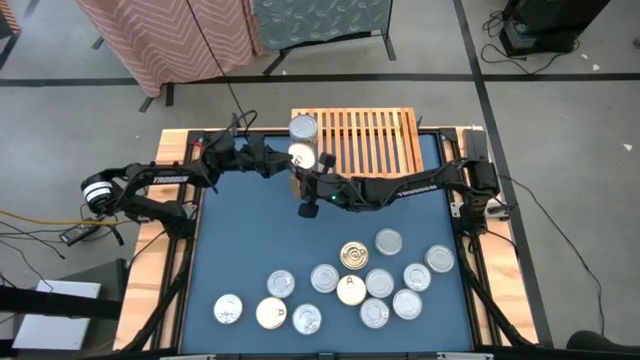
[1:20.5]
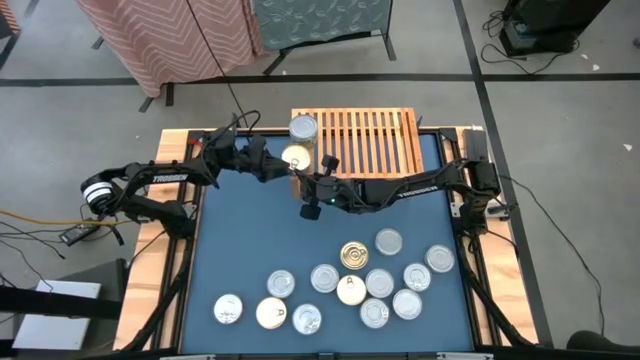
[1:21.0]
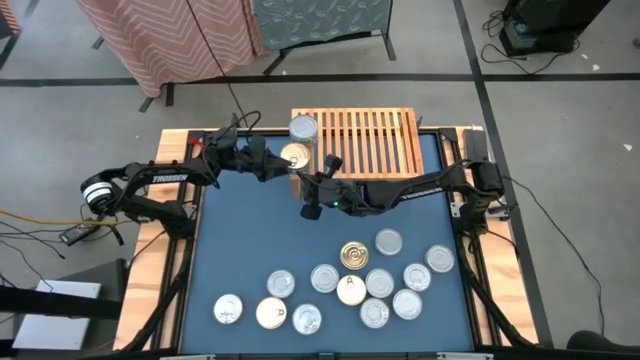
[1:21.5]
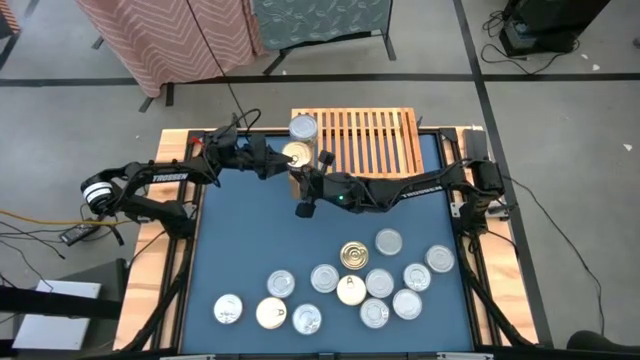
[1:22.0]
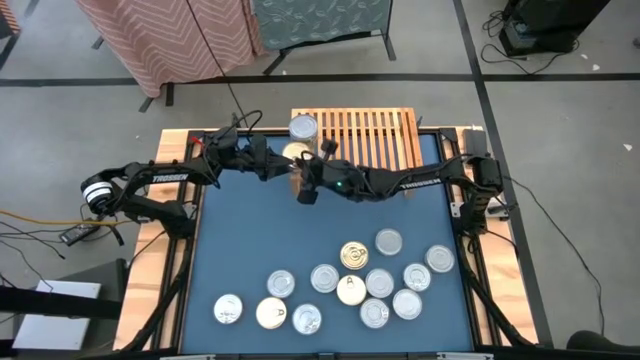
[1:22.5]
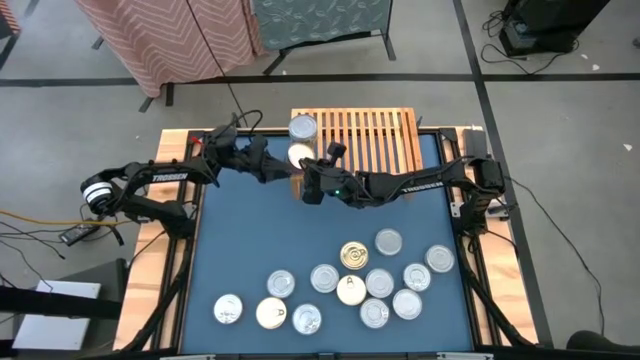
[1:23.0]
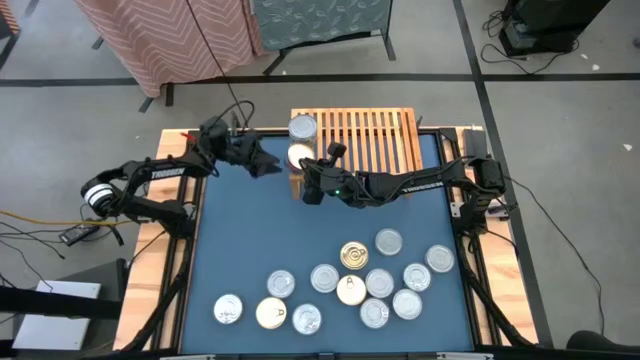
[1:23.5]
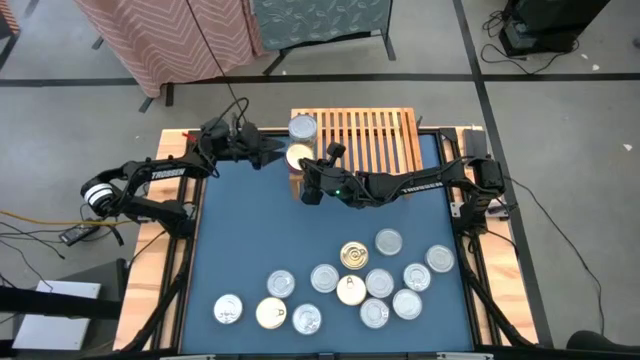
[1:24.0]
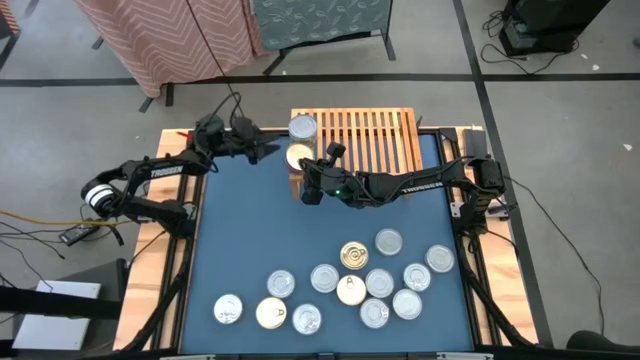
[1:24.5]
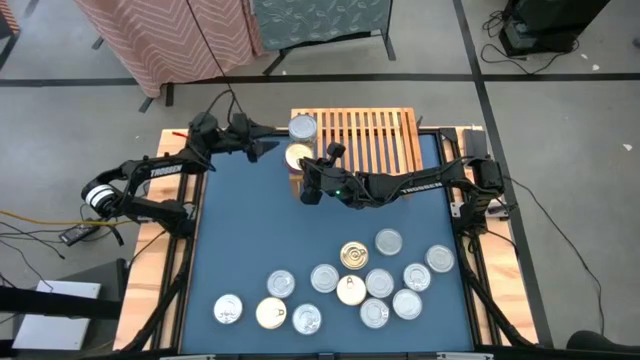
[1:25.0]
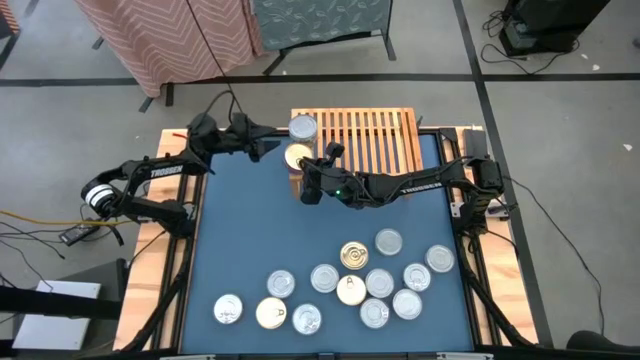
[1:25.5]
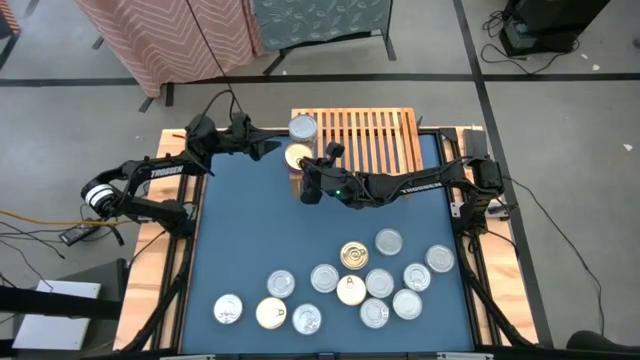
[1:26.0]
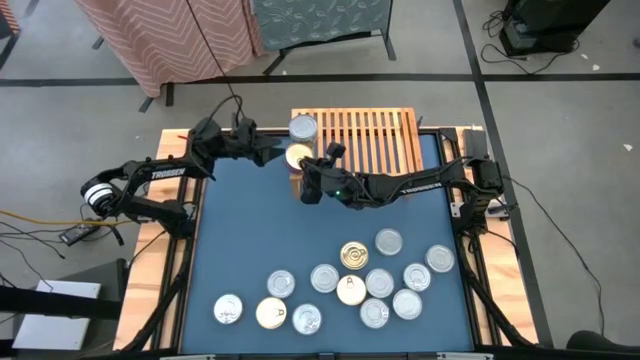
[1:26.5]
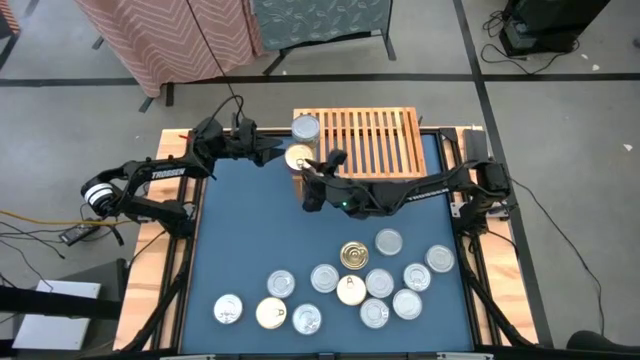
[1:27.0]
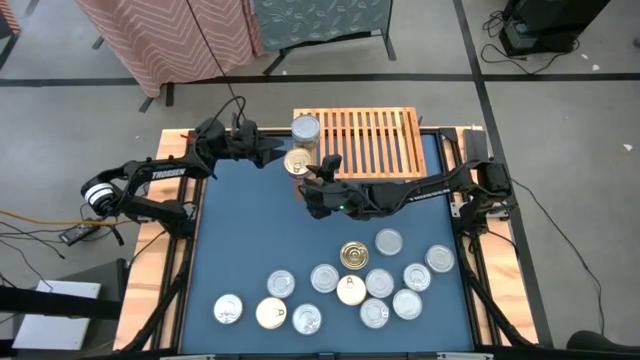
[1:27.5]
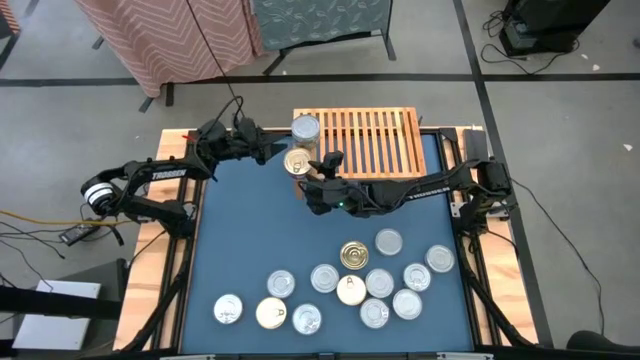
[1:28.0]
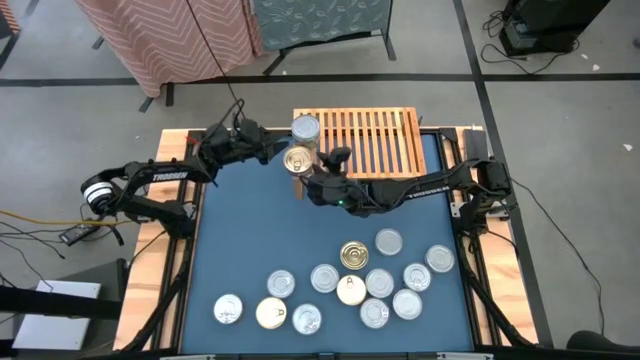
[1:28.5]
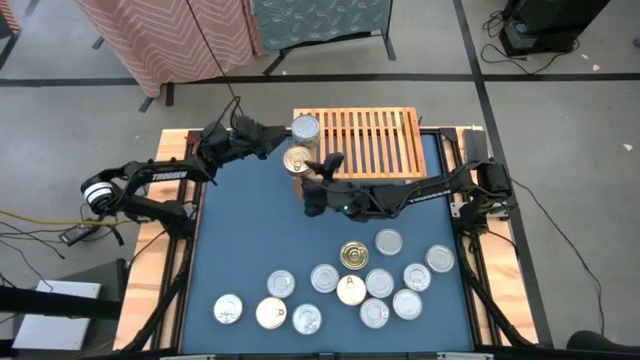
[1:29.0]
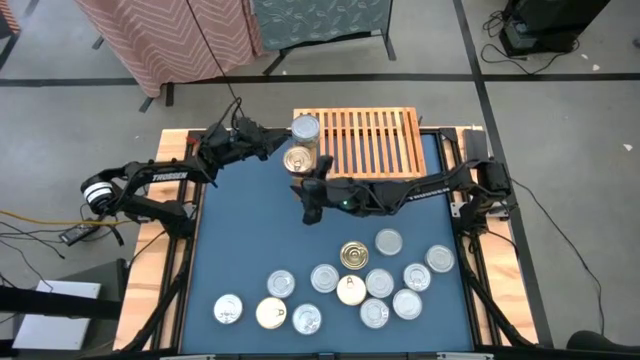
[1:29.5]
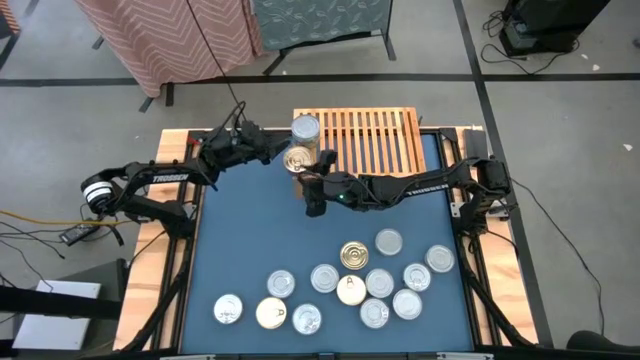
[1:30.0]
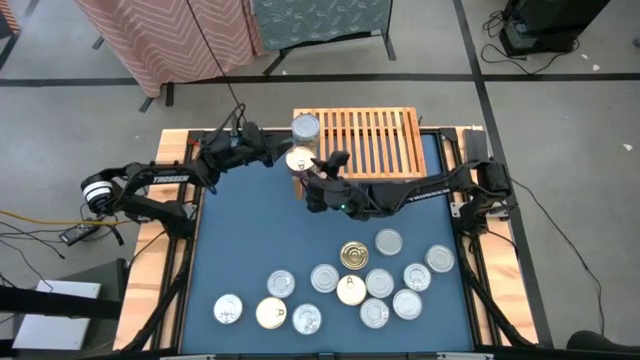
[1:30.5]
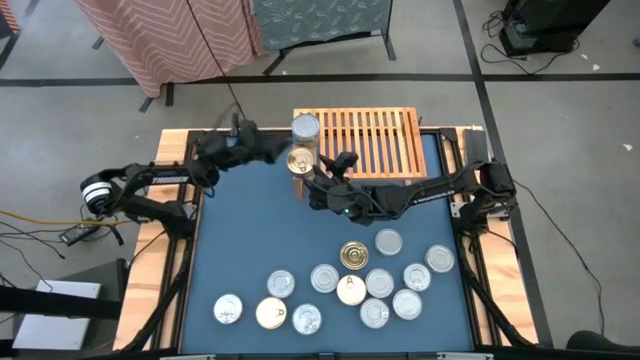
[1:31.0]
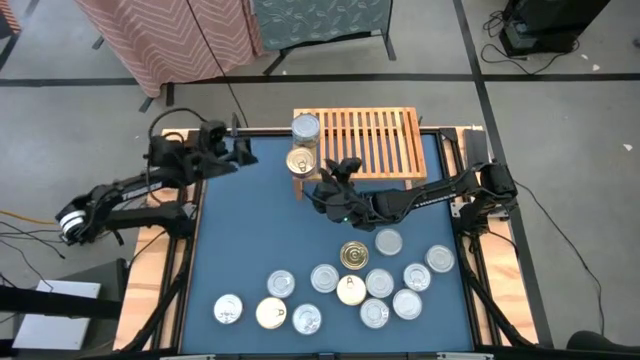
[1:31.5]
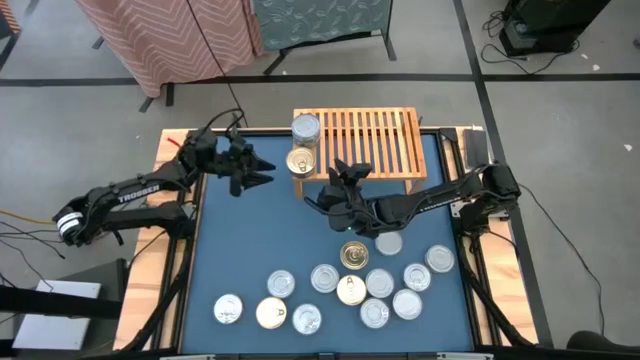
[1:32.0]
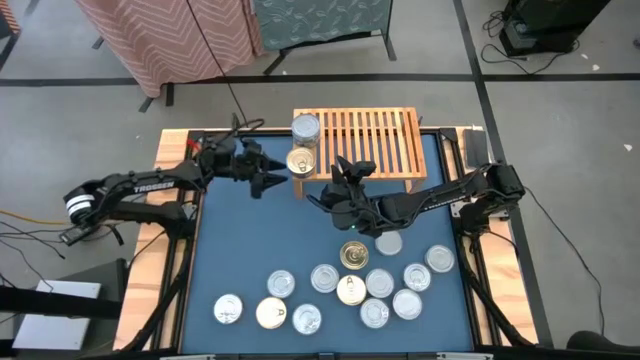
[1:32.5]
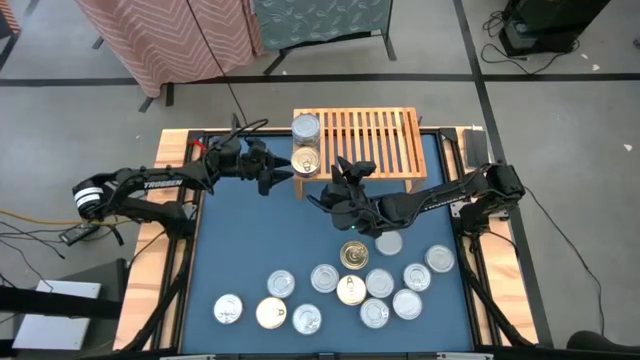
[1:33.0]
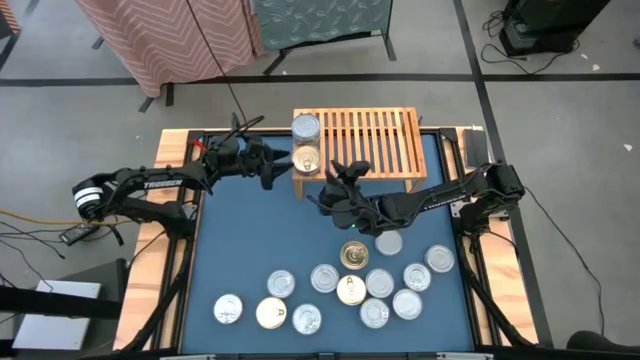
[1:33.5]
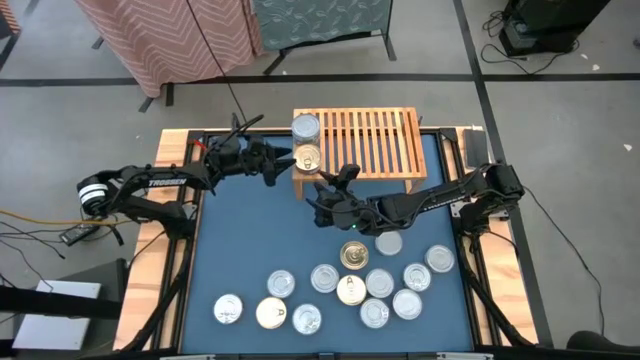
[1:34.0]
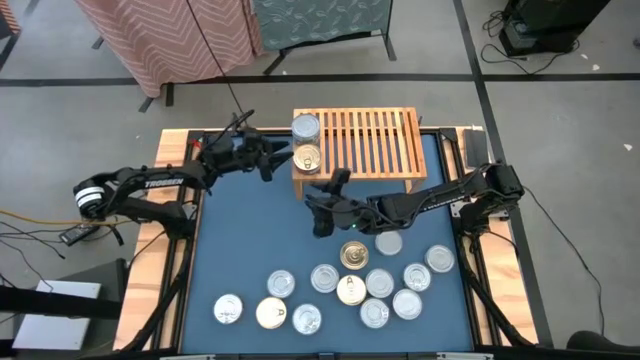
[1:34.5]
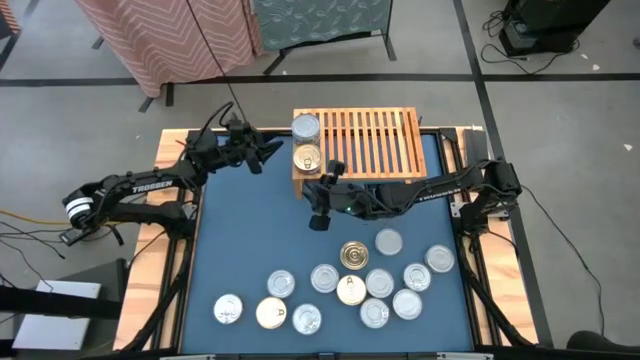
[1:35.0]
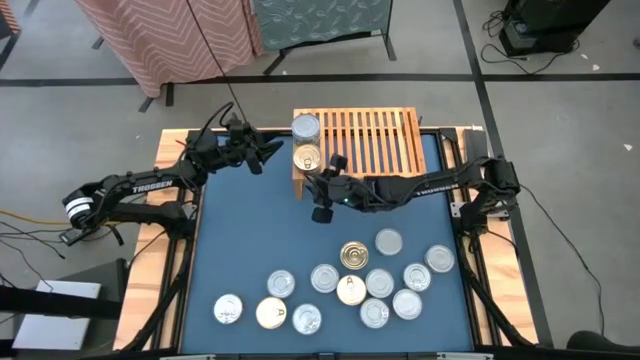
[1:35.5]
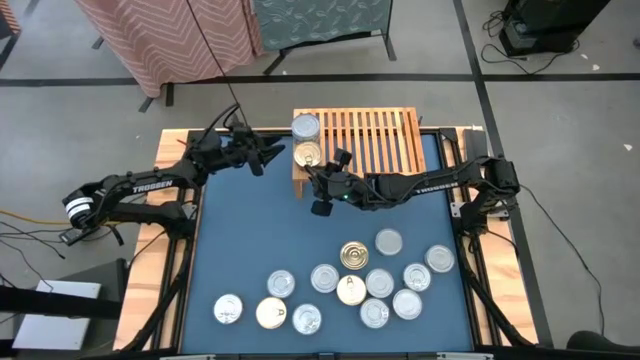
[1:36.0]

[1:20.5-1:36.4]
Task: Stack canned seafood by type on shelf
Put the blue tuna can on the shelf aligned with the green tuna can

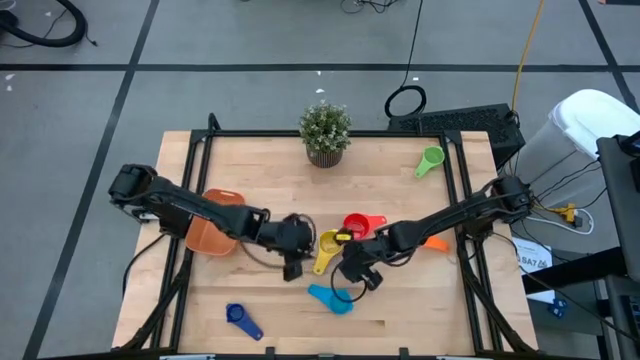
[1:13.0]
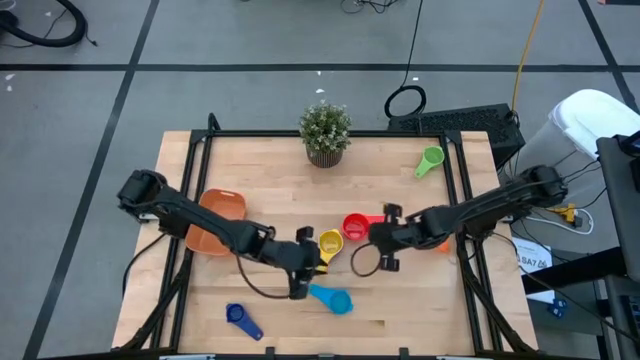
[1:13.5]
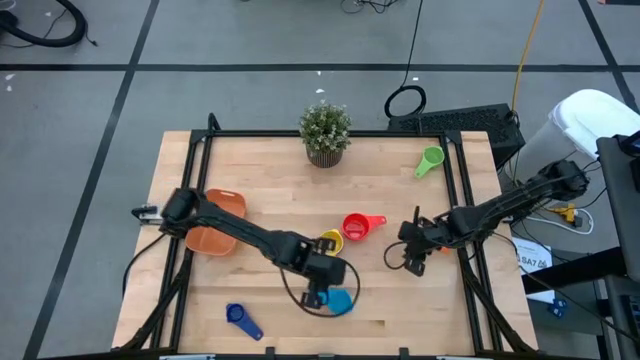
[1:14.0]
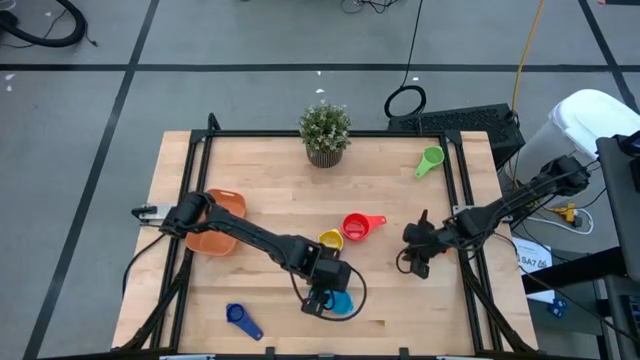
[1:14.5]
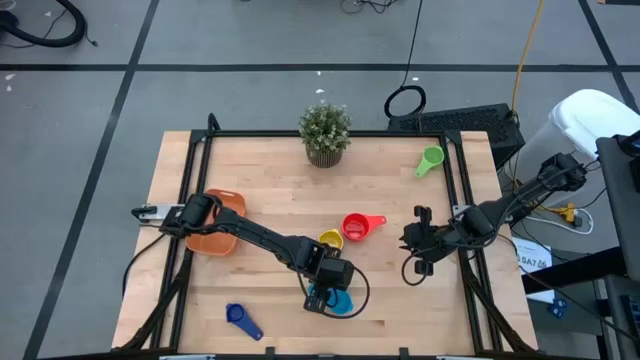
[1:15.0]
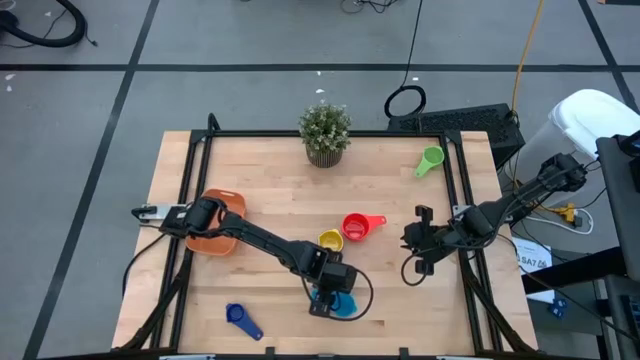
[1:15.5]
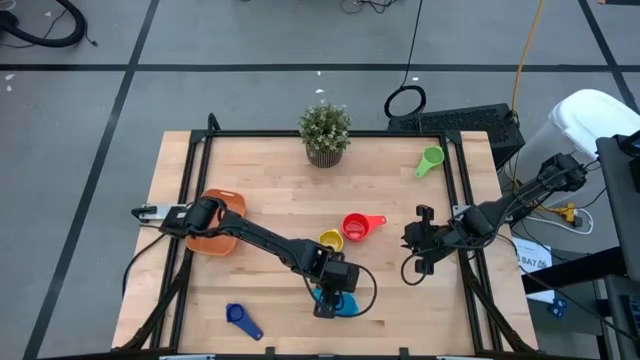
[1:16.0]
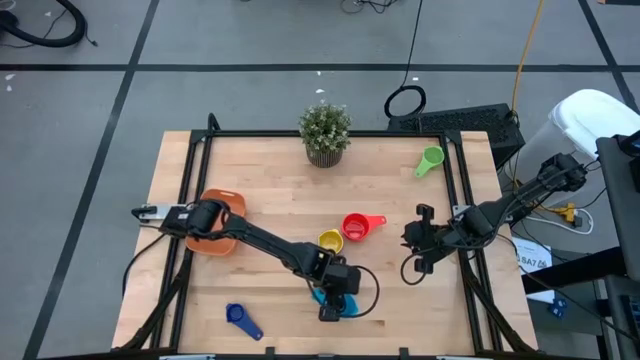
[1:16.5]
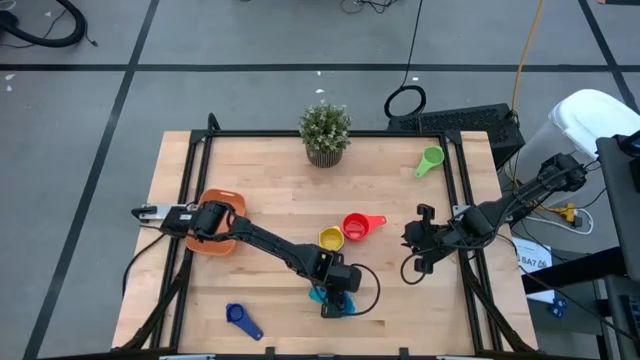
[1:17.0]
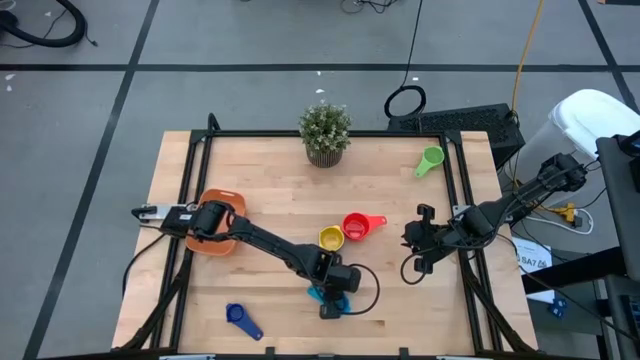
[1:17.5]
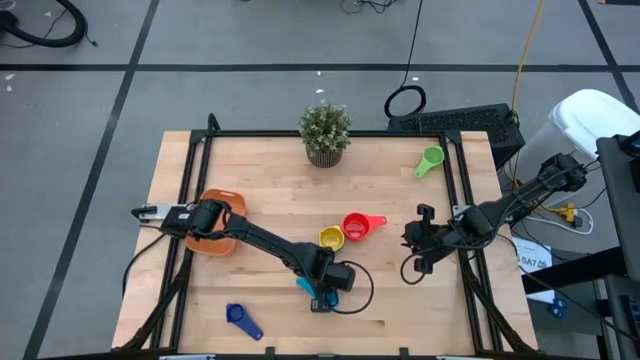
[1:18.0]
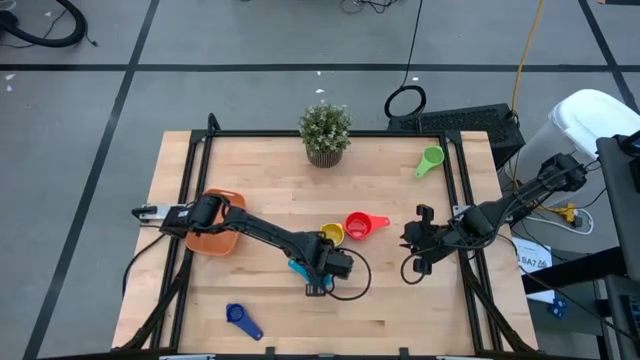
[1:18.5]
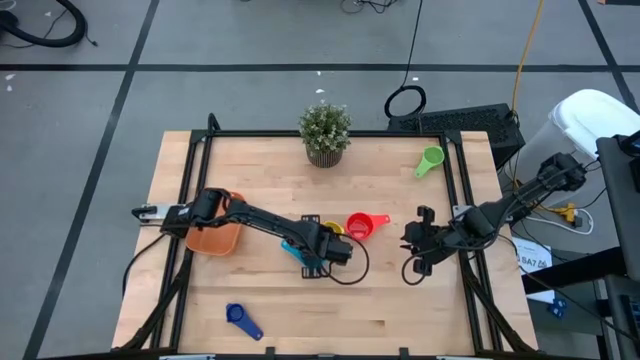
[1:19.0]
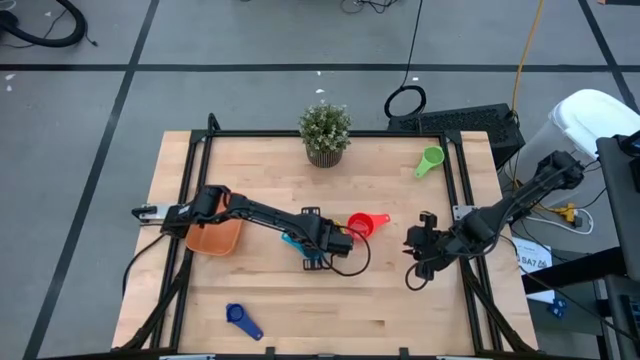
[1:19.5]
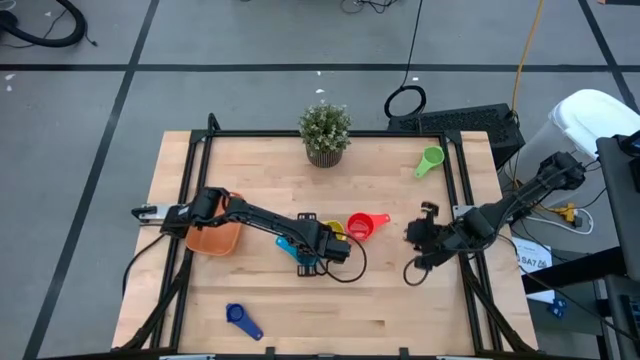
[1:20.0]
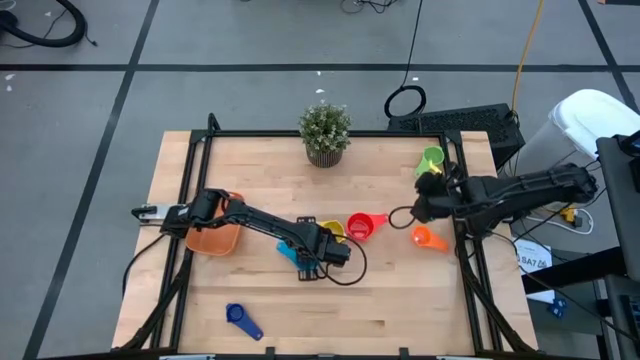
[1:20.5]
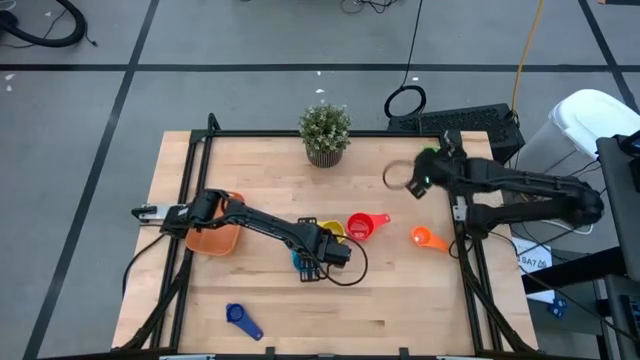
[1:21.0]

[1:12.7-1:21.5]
Task: Nest measuring cups in basket
Move the light blue measuring cup to the center of the table
